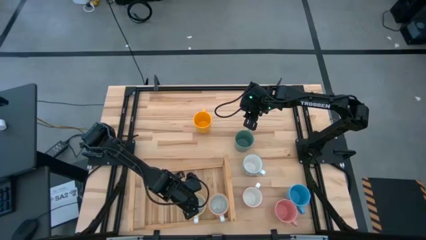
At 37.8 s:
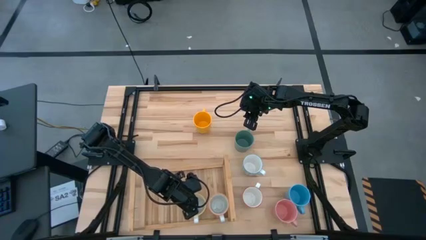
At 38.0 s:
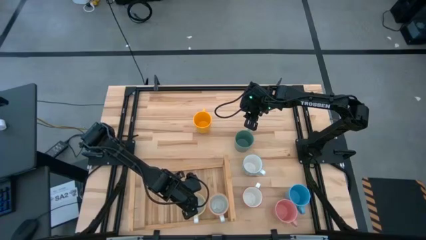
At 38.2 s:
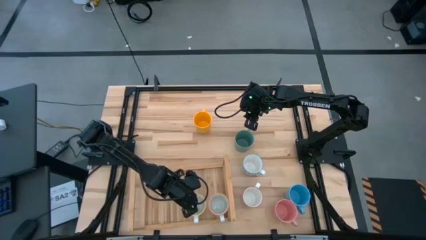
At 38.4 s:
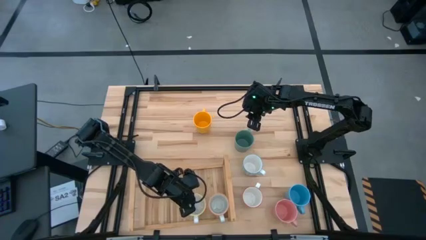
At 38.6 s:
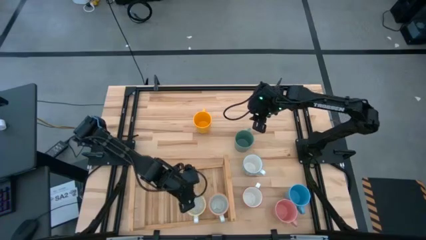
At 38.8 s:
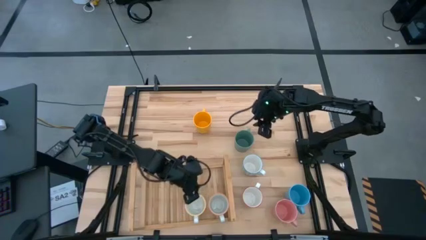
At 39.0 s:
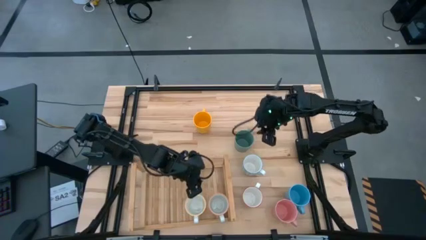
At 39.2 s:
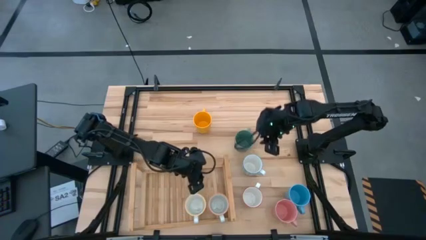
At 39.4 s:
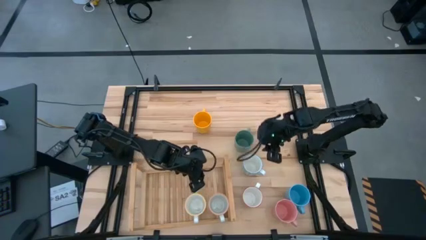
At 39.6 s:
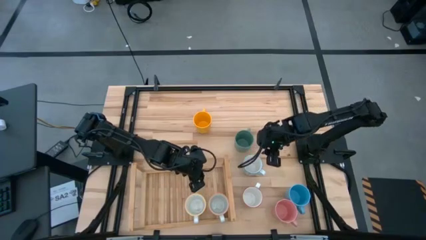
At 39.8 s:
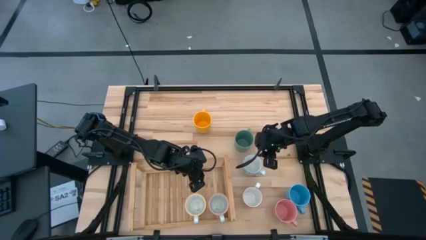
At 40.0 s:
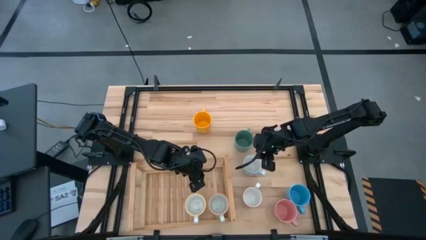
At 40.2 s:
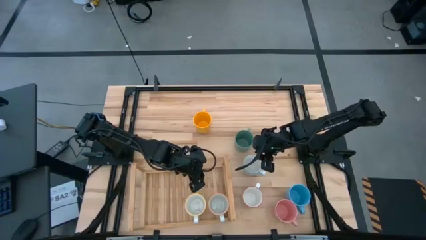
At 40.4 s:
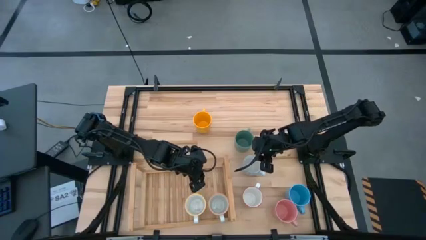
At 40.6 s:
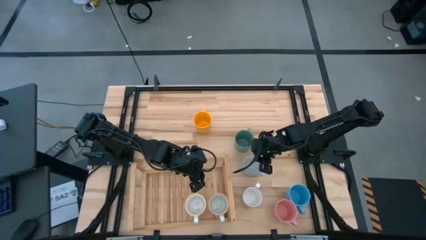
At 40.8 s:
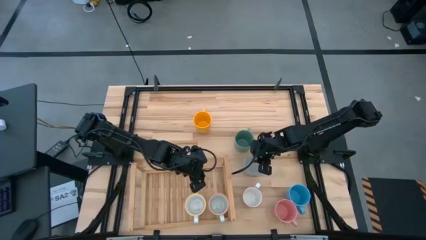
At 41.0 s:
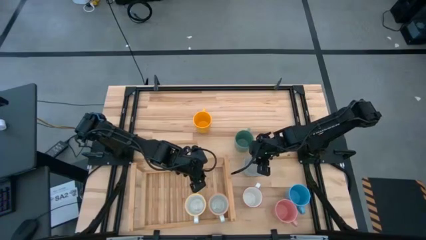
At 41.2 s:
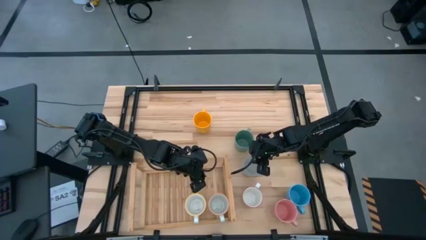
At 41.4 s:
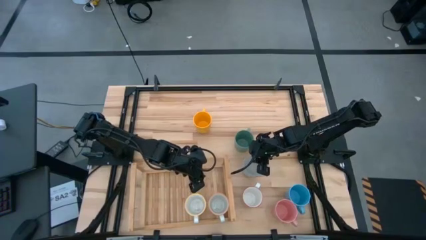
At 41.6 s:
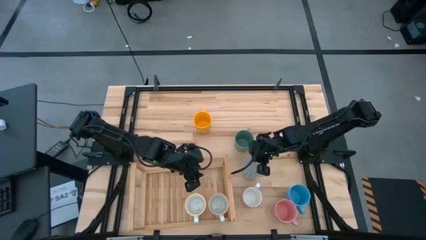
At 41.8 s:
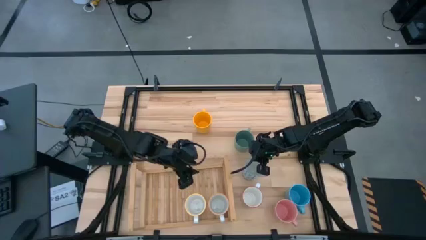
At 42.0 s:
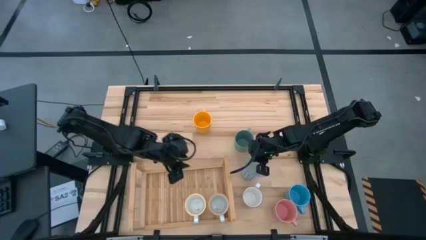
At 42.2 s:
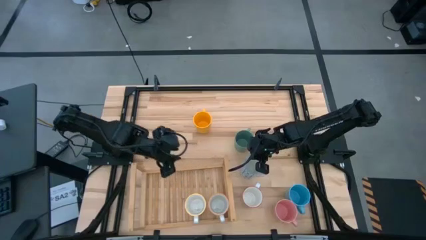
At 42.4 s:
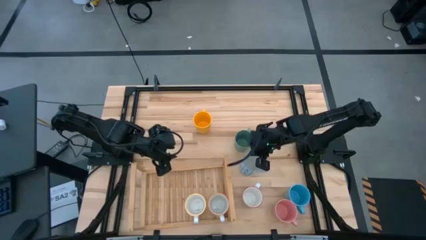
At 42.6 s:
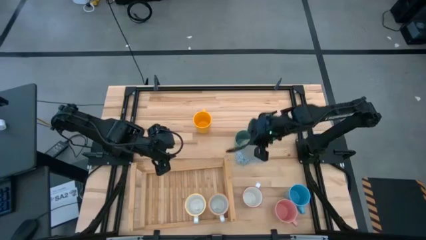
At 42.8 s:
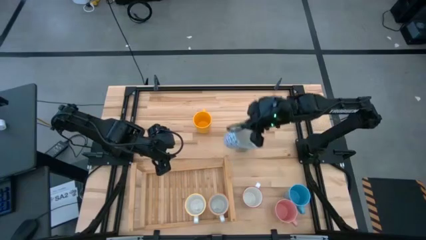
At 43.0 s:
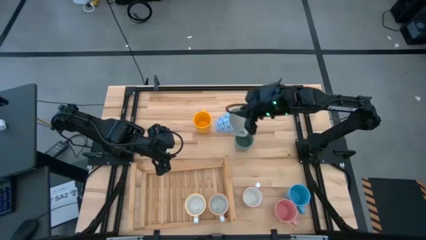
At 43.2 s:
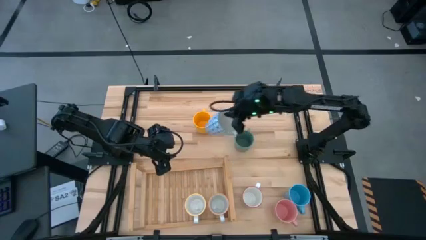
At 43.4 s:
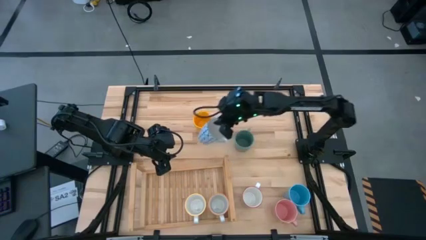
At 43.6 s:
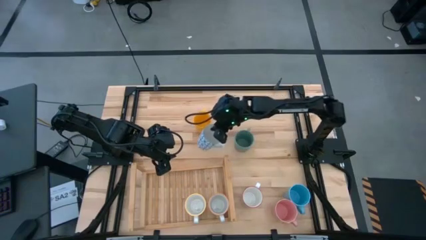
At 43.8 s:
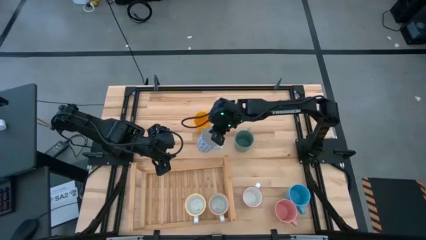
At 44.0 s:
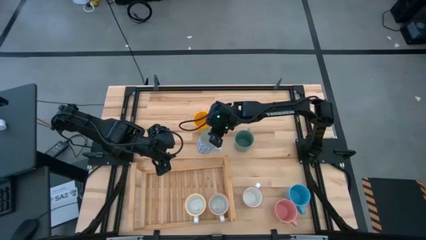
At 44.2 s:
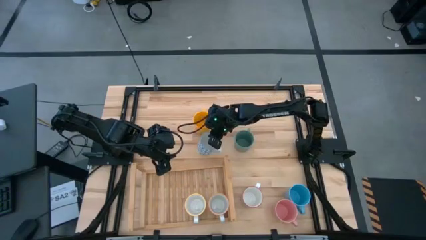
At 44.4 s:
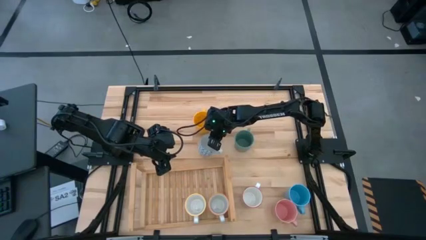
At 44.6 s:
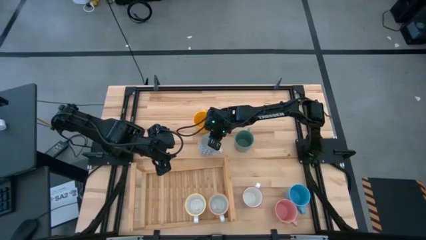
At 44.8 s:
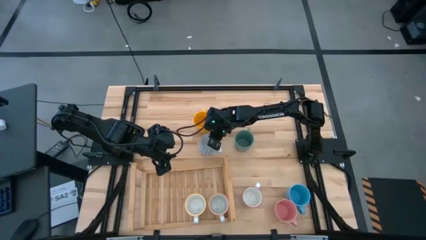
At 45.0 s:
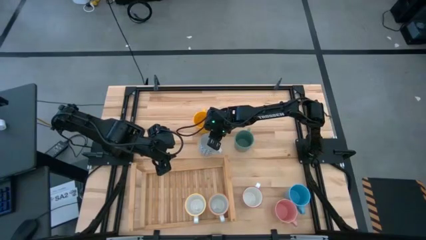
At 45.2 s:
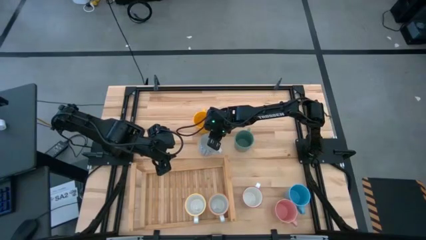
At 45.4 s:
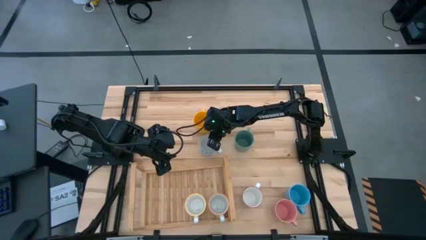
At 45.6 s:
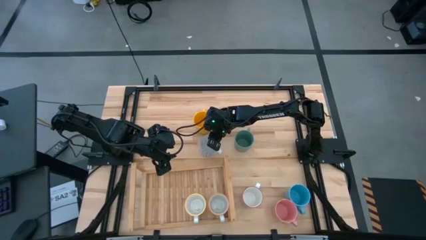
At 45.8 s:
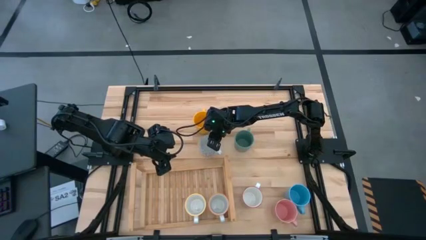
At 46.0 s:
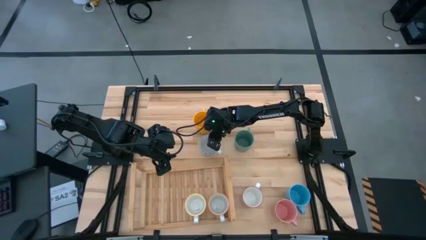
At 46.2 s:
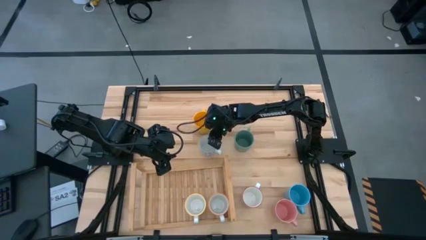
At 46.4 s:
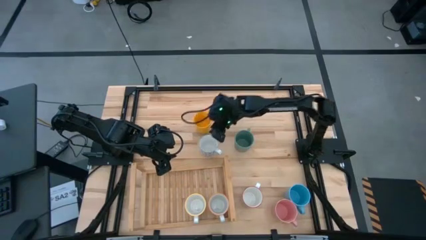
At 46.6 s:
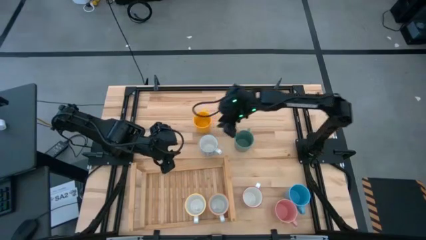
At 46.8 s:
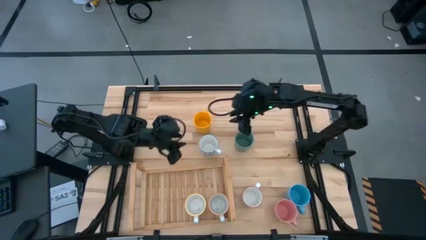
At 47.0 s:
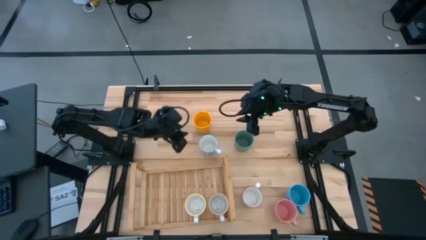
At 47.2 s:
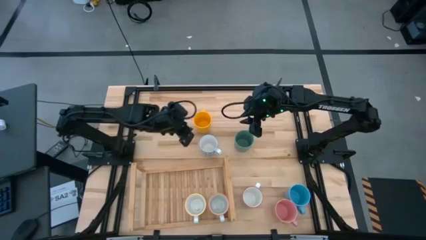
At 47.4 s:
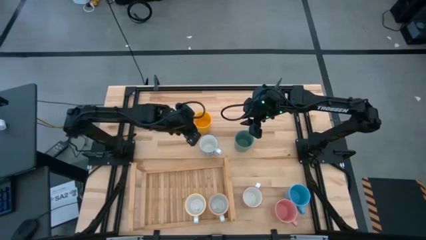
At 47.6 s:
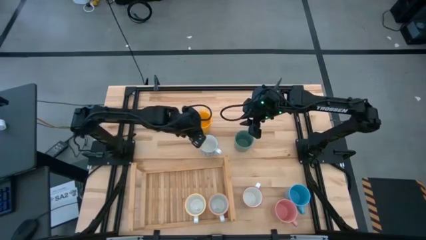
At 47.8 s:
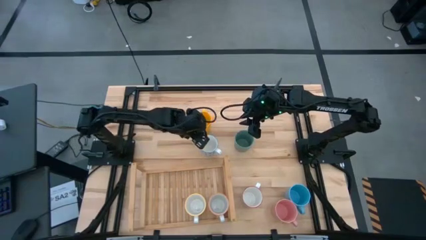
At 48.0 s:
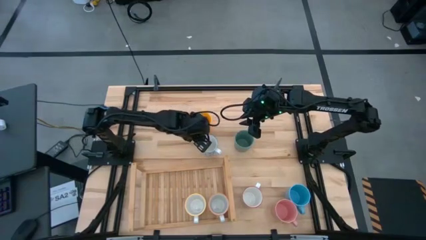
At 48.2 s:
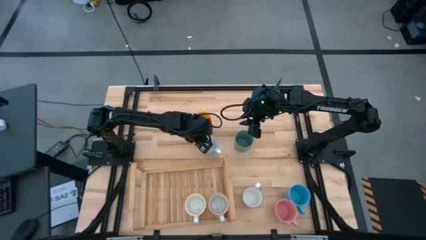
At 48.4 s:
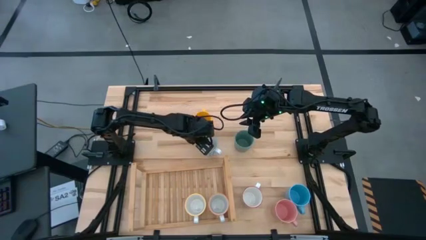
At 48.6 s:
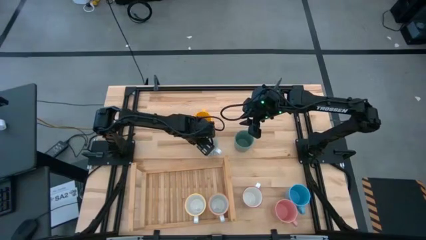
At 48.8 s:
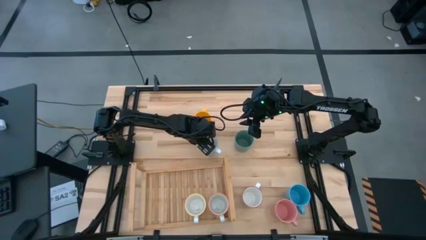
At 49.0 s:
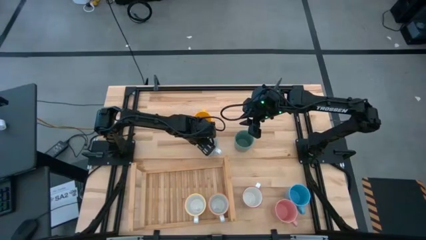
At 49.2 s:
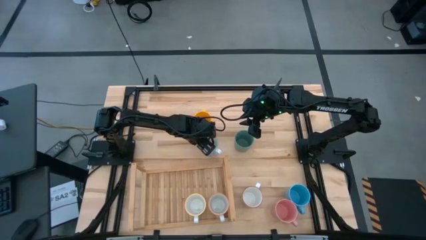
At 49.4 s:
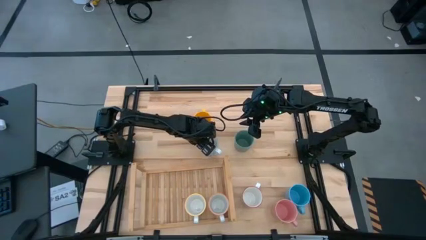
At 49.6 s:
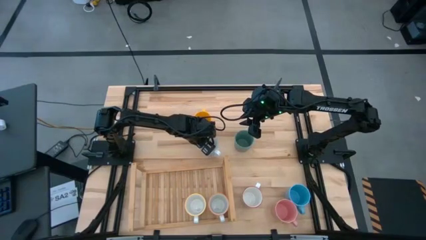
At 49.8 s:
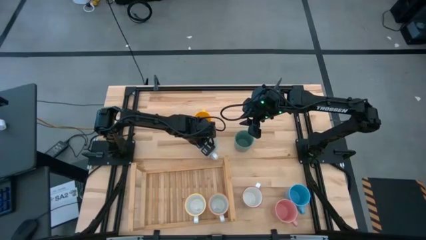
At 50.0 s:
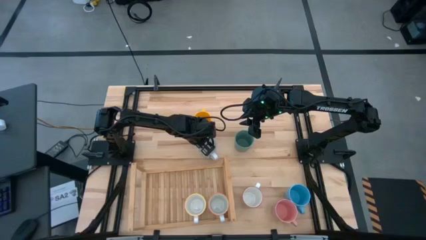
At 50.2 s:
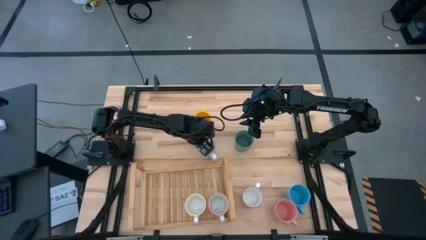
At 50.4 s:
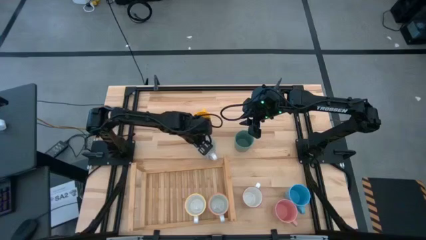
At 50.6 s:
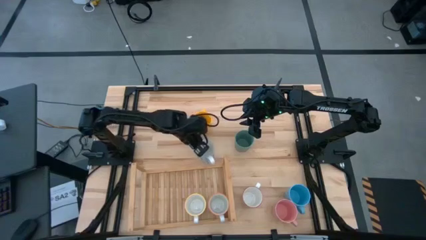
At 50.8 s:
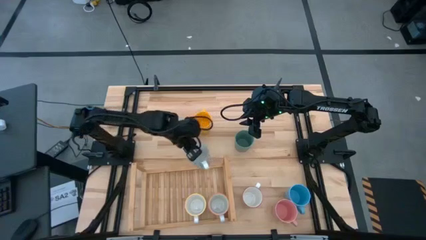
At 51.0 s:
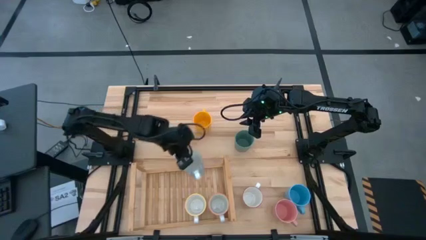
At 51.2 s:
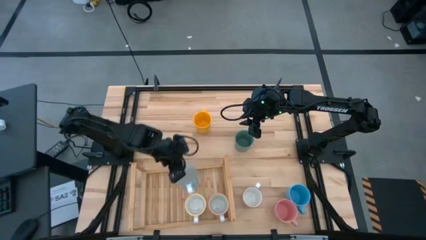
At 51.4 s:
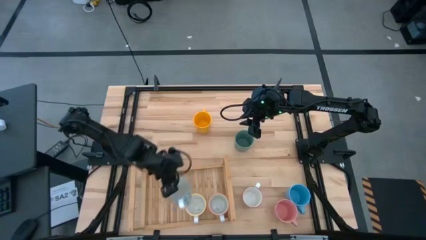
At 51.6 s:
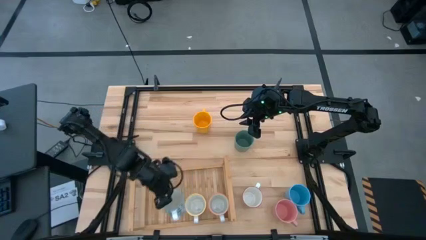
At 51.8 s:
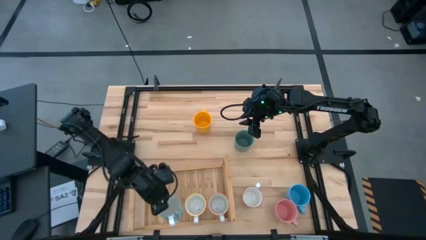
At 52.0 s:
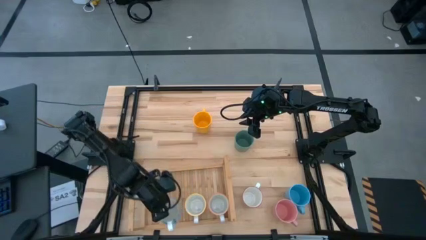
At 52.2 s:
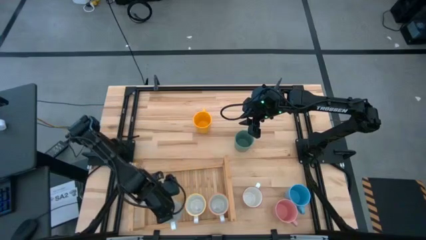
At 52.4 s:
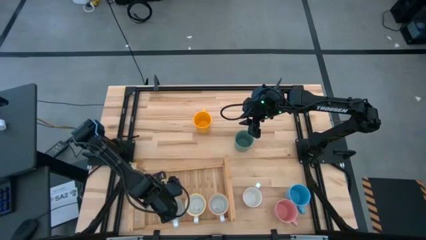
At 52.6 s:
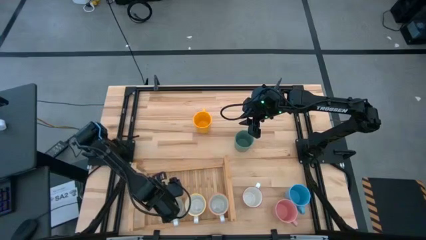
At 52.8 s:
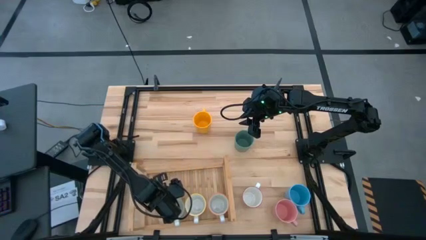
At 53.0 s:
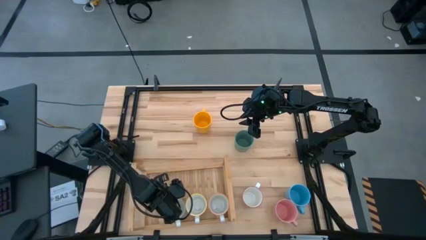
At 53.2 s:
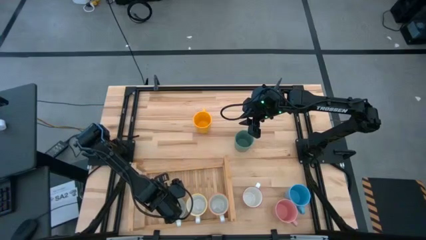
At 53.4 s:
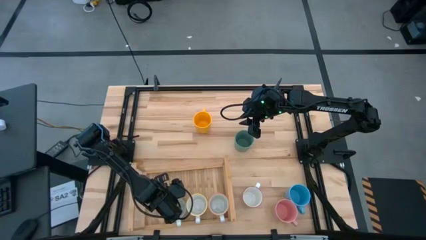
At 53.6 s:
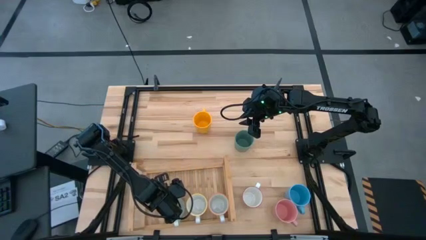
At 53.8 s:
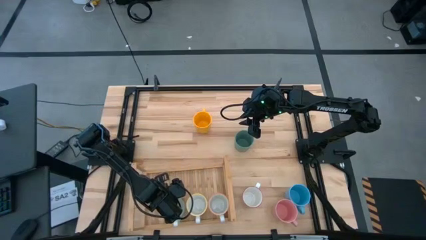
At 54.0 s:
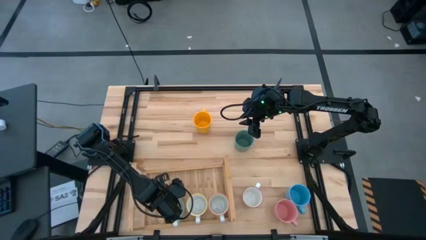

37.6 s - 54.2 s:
Task: Place coffee mugs
Put the blue patterned mug on the shelf
